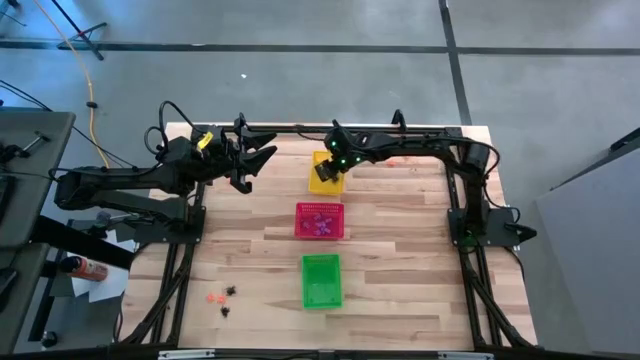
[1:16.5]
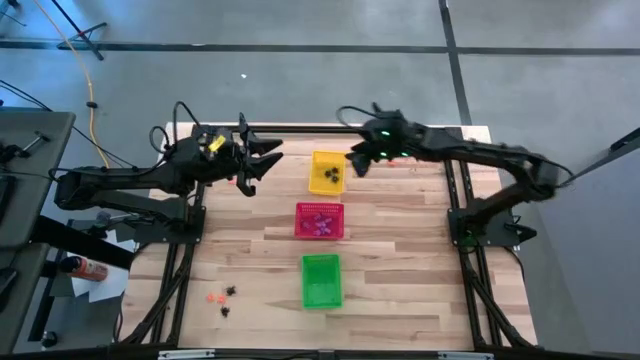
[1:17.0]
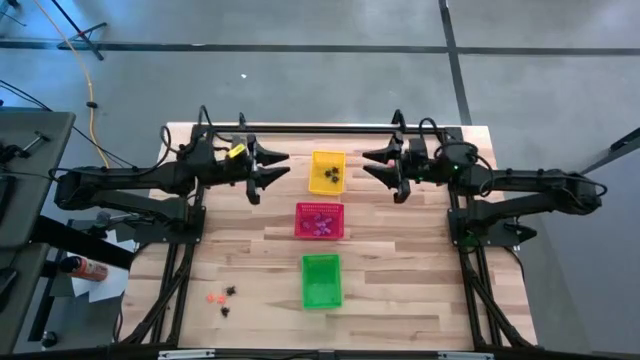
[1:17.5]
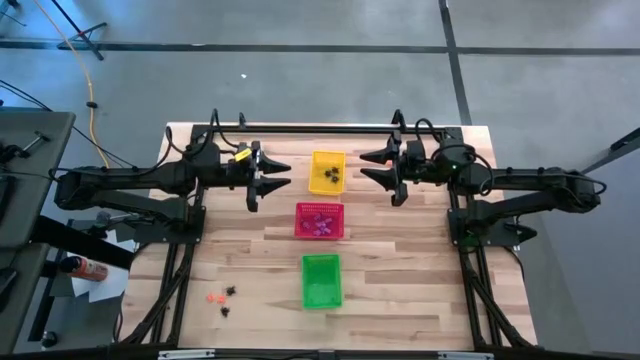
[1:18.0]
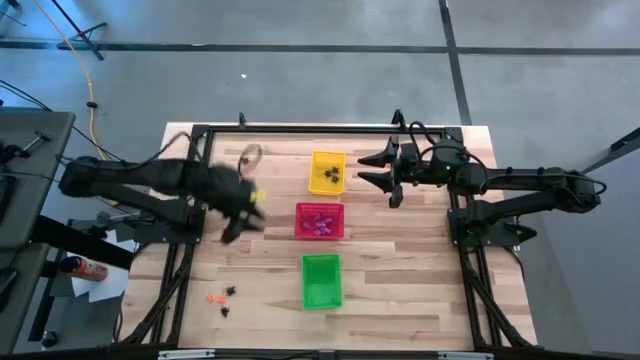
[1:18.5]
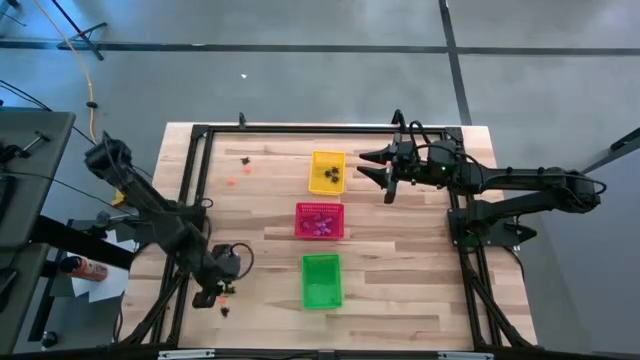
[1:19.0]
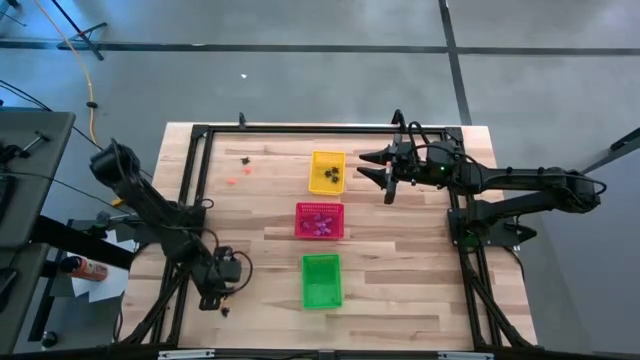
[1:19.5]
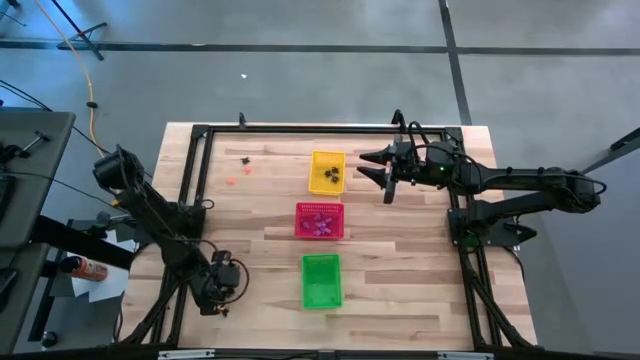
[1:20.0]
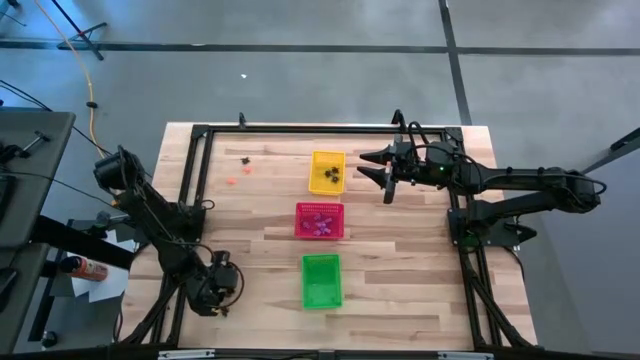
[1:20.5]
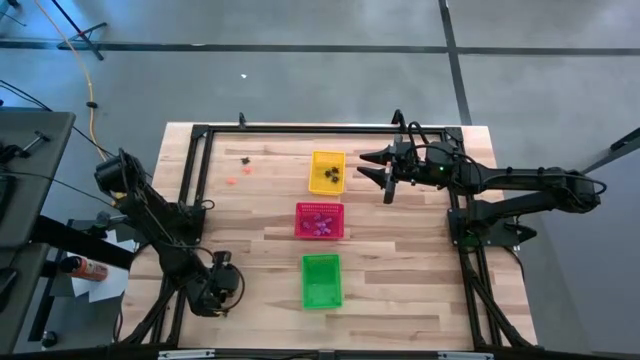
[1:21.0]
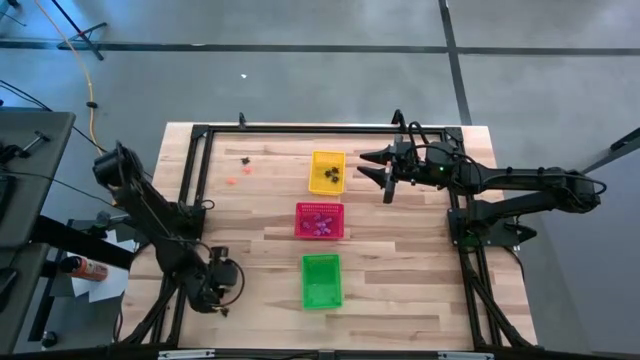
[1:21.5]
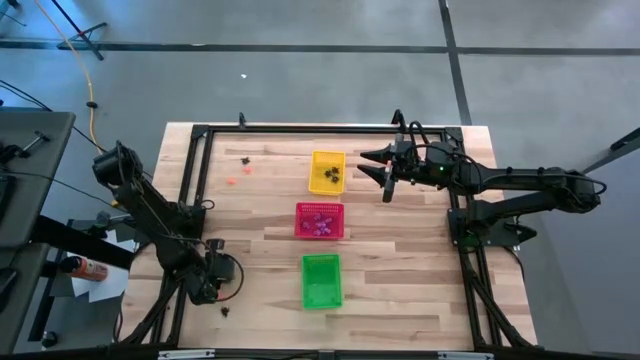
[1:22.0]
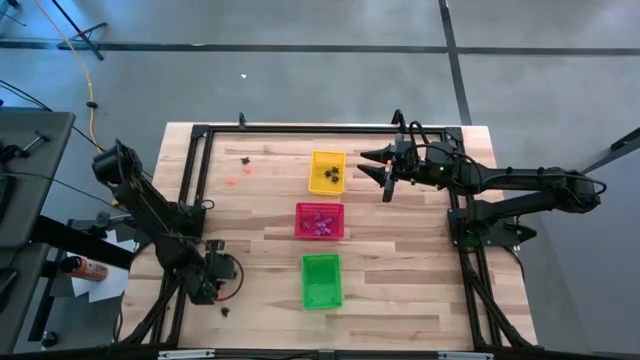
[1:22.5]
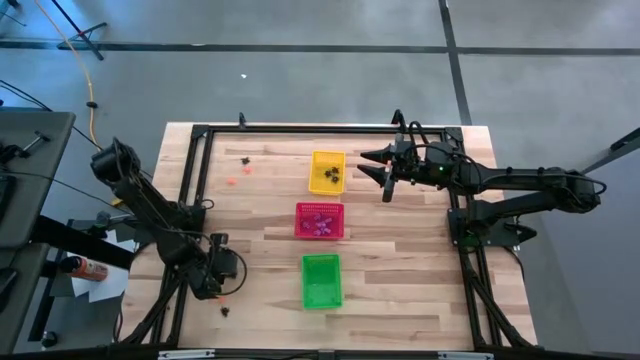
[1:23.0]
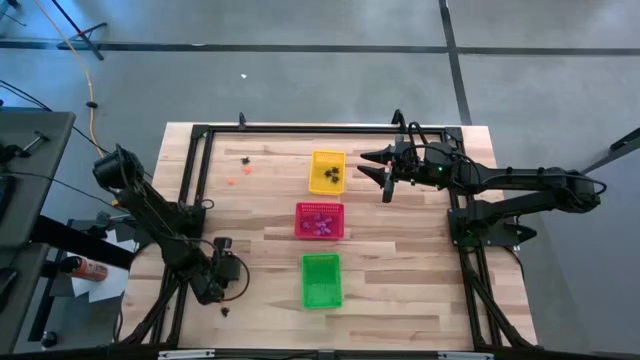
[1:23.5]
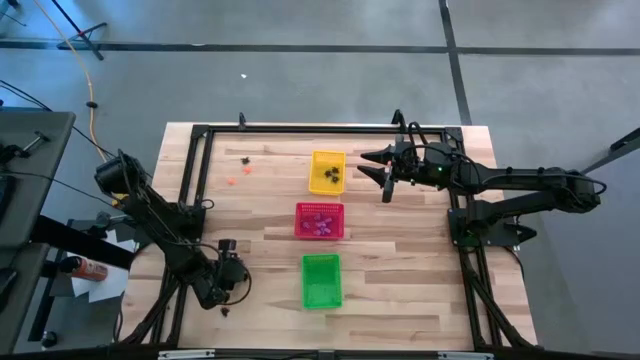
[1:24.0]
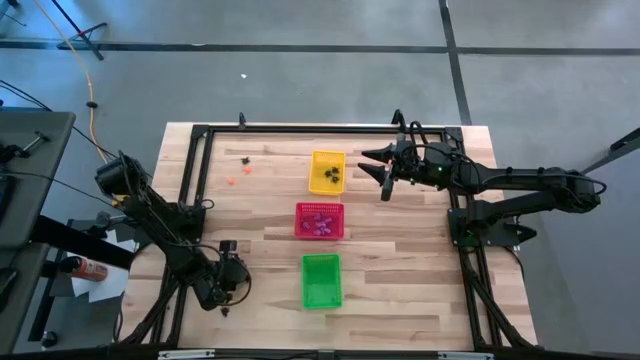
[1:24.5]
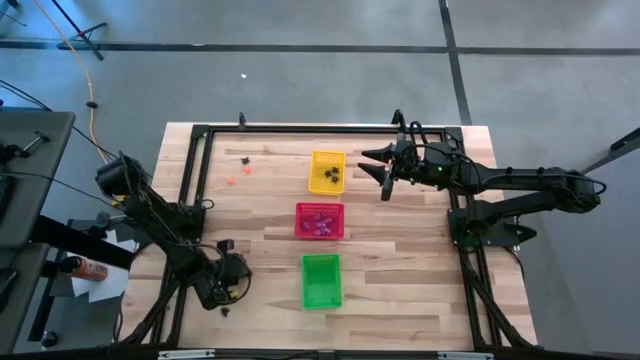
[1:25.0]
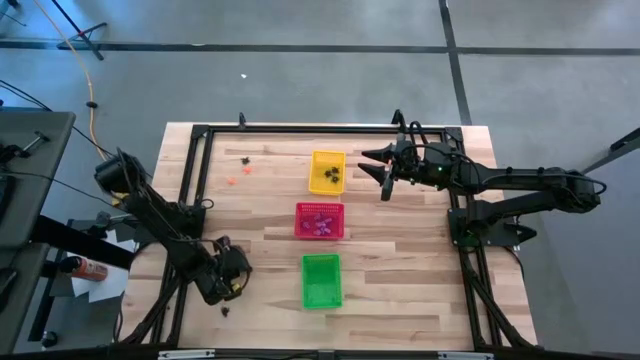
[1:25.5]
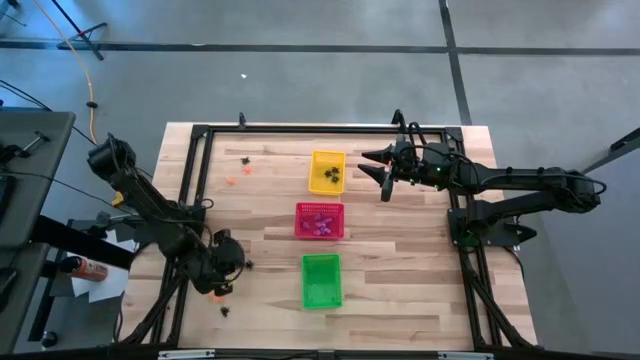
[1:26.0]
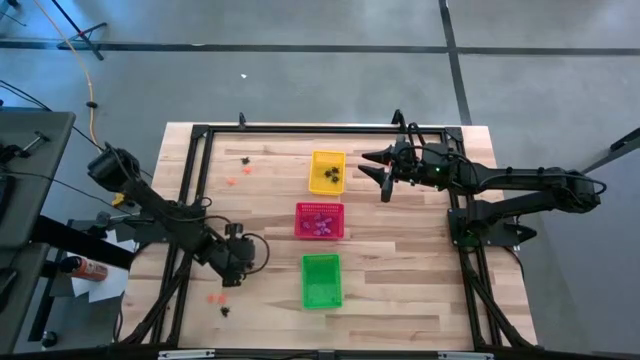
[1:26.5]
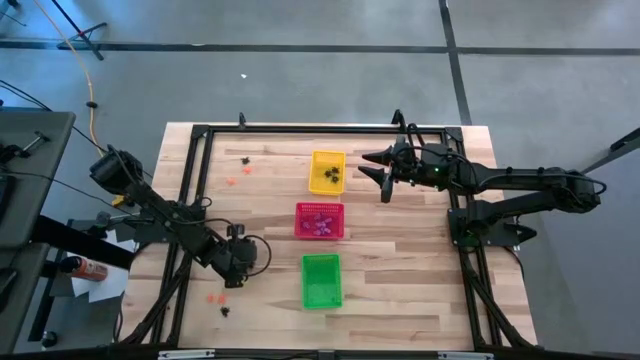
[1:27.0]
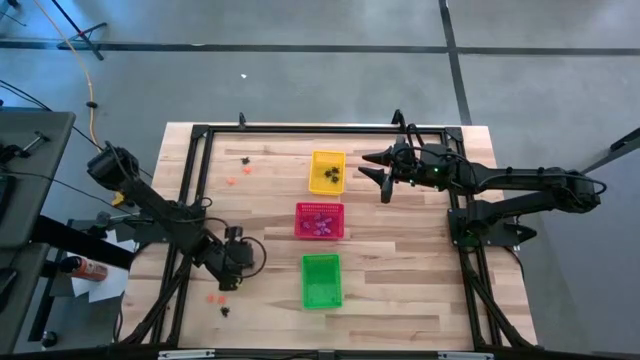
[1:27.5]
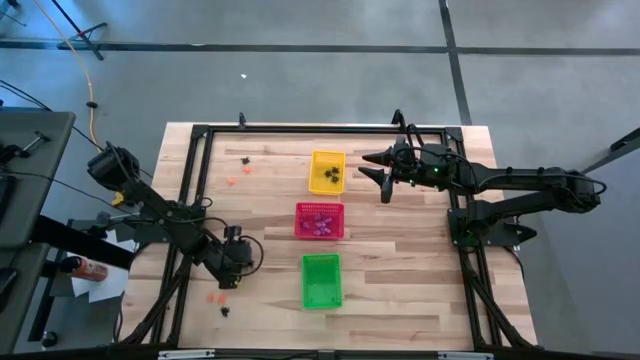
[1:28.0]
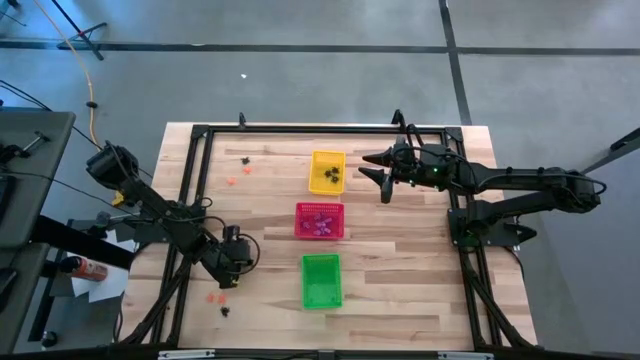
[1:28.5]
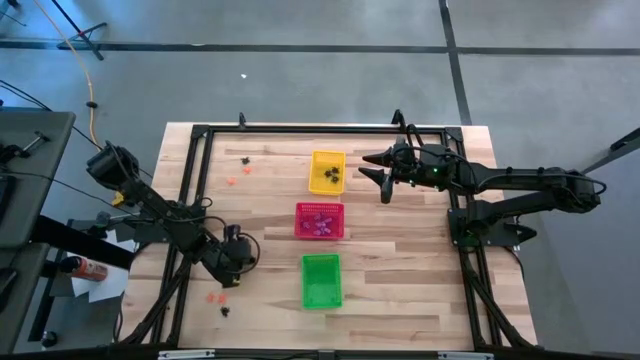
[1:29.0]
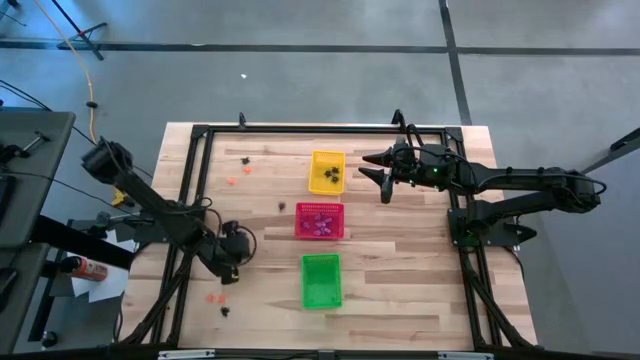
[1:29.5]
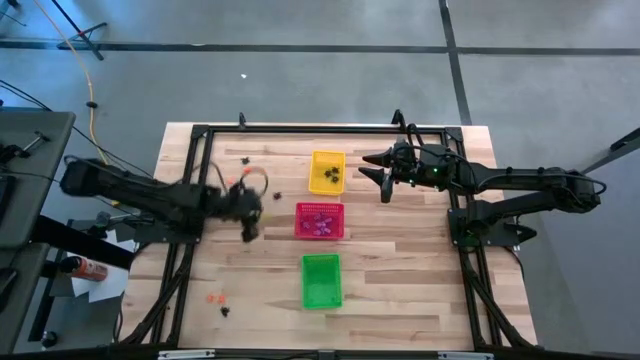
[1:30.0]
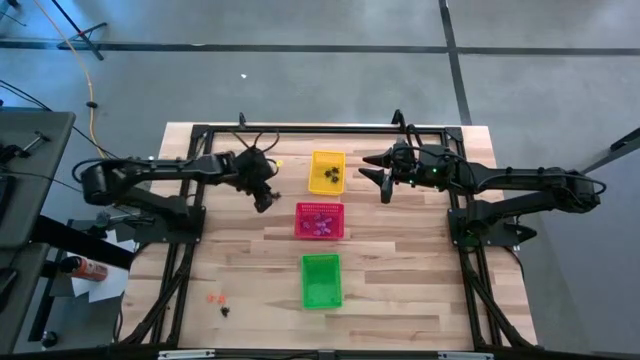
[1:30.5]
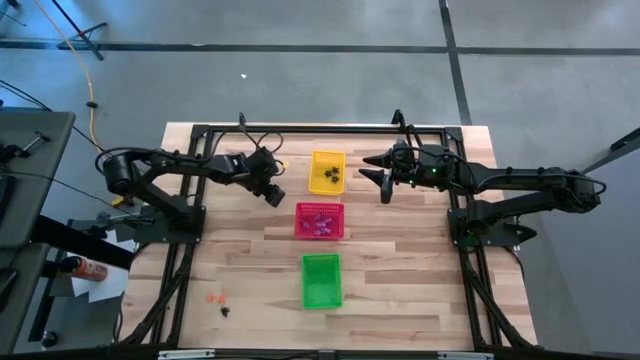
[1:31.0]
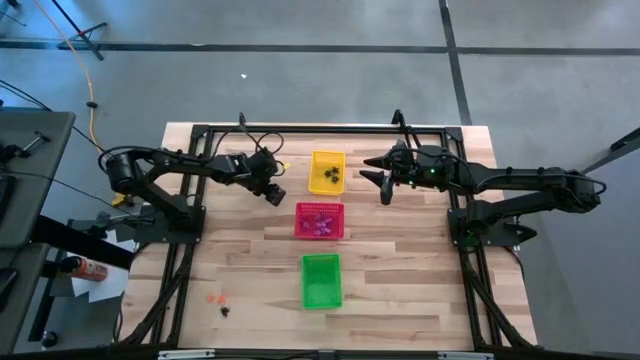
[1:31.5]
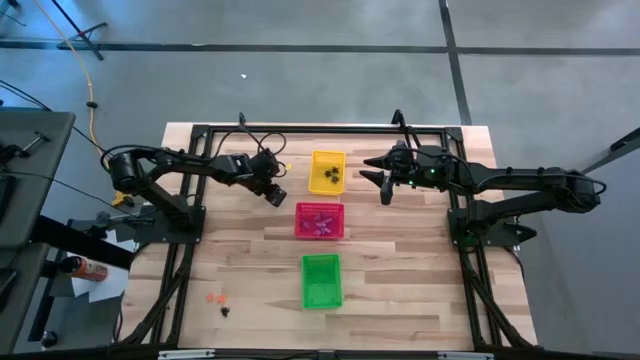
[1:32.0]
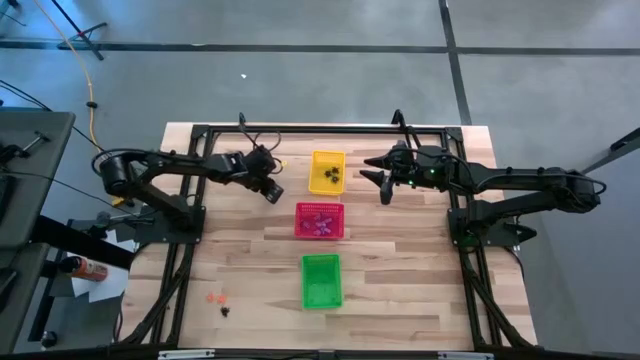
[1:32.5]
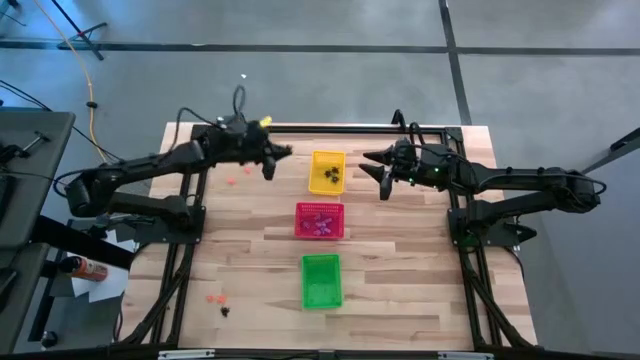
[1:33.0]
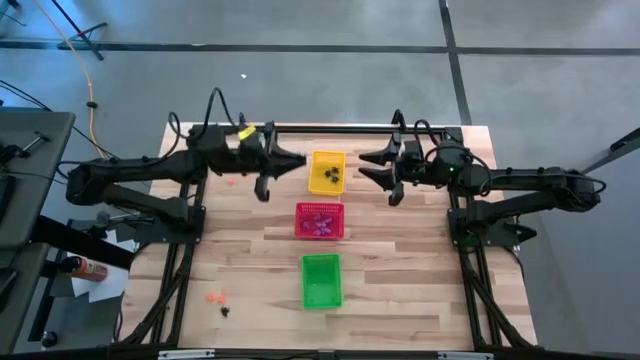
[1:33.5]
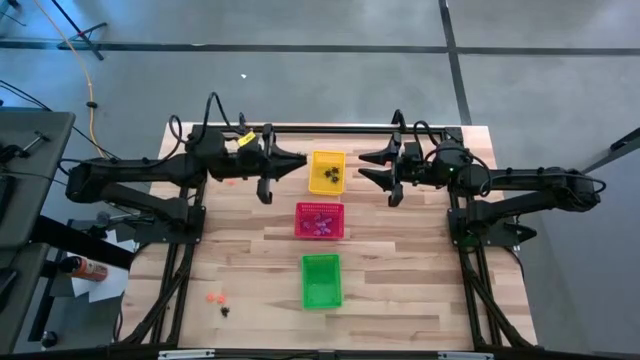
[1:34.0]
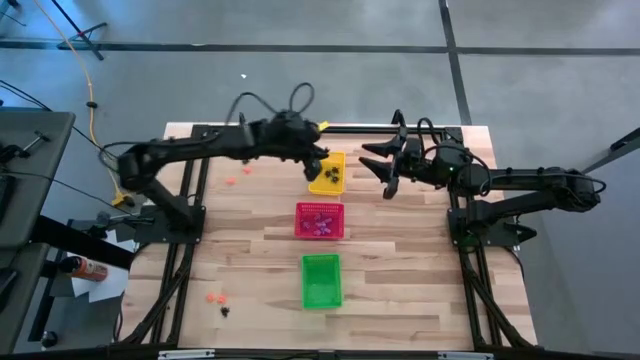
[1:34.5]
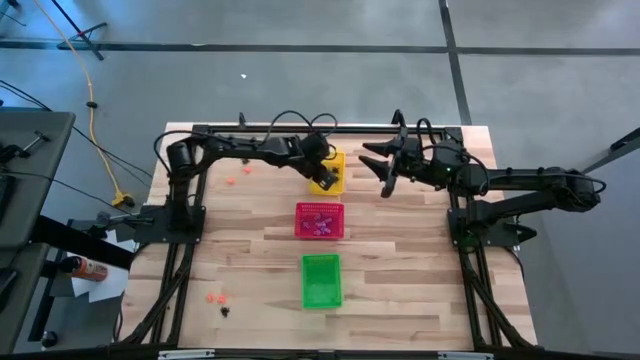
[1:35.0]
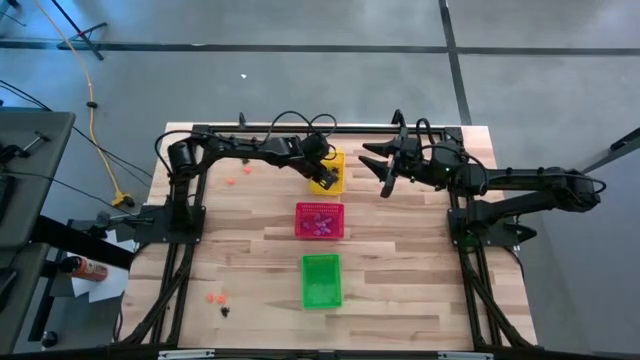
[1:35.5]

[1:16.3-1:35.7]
Task: Sort Halloween decoration
Put the black spider toy into the yellow bin
